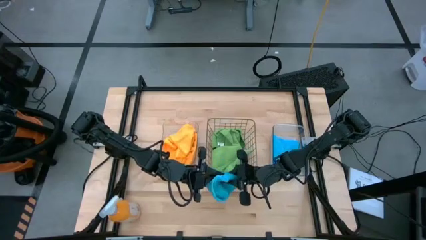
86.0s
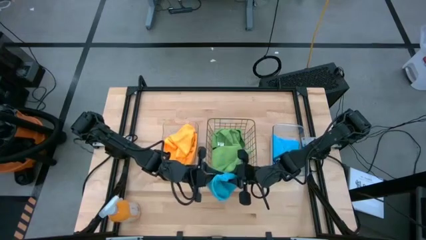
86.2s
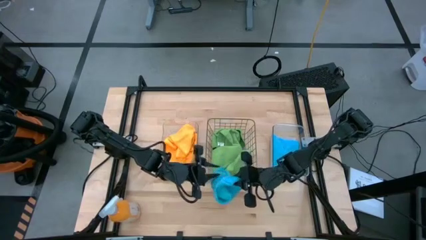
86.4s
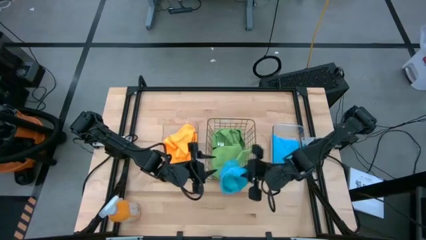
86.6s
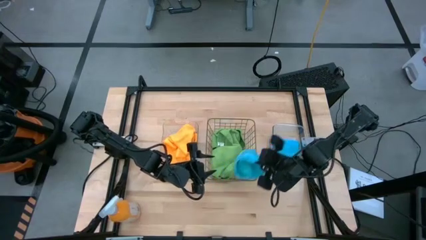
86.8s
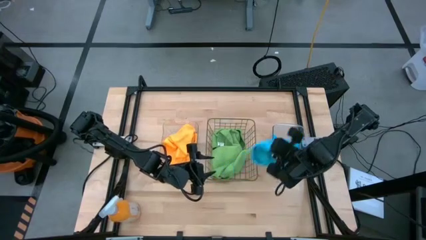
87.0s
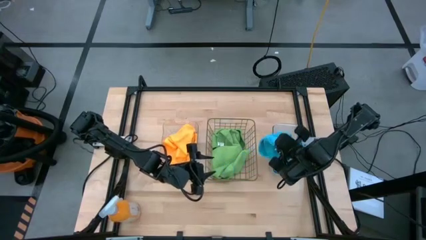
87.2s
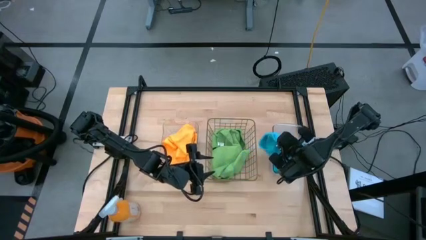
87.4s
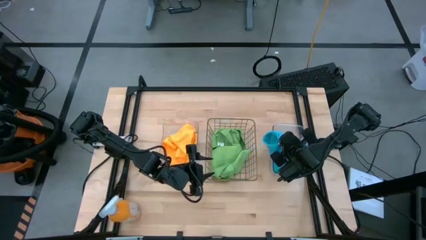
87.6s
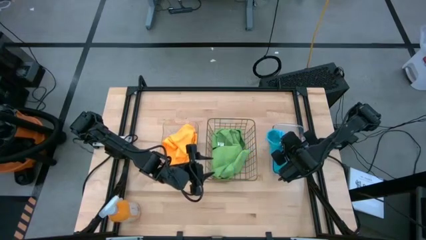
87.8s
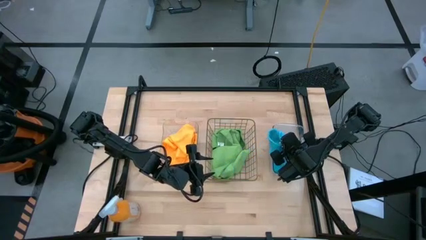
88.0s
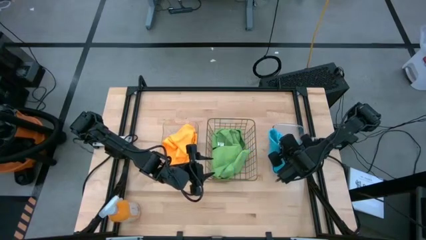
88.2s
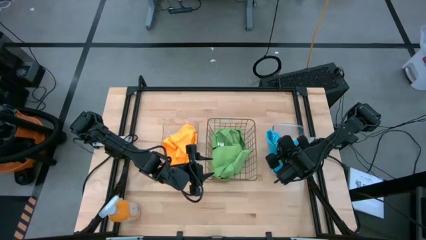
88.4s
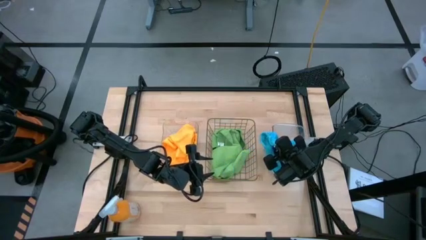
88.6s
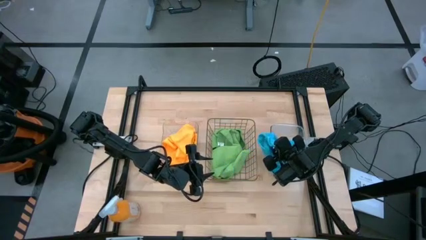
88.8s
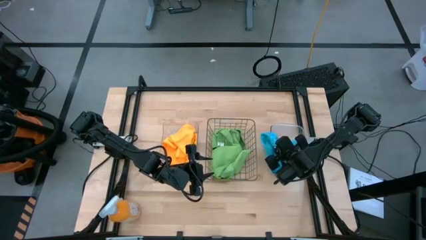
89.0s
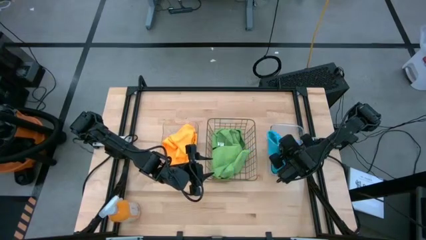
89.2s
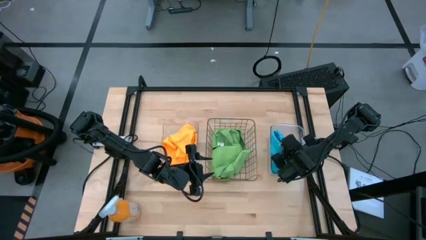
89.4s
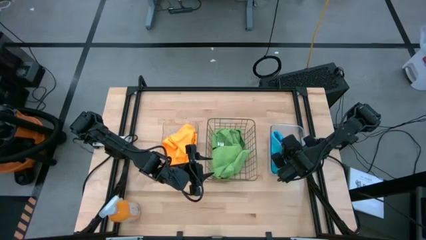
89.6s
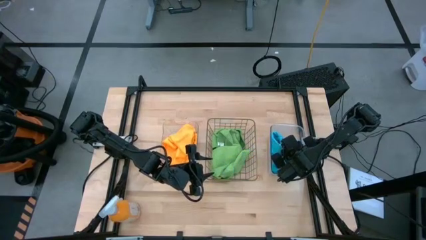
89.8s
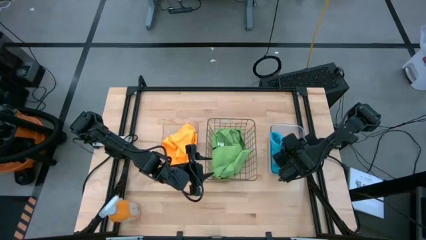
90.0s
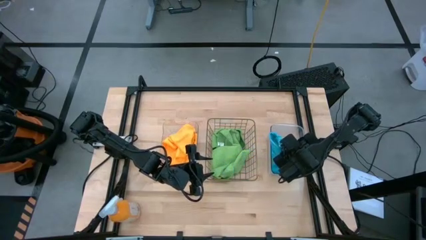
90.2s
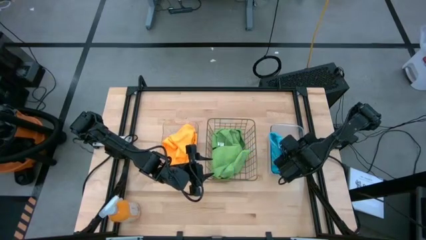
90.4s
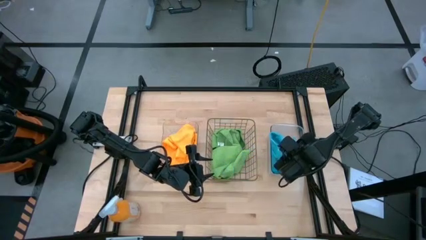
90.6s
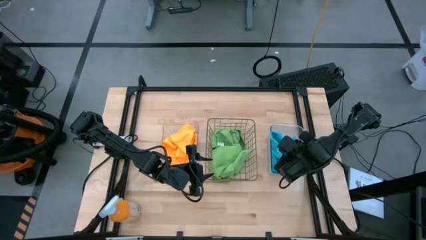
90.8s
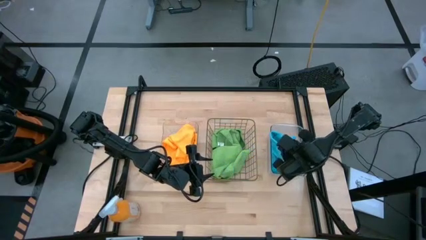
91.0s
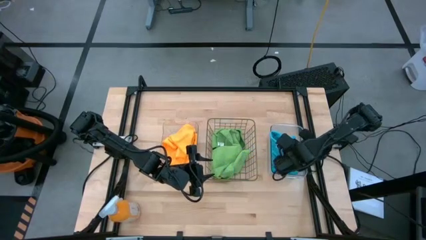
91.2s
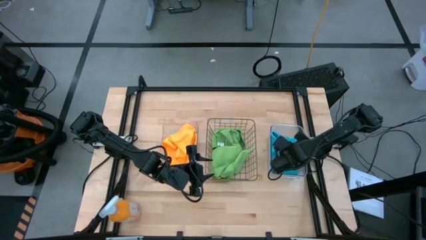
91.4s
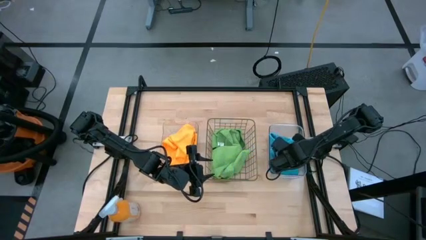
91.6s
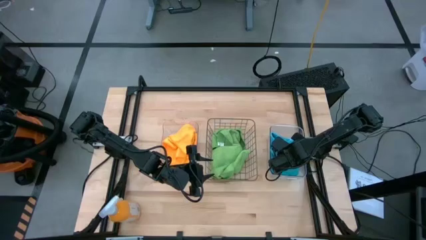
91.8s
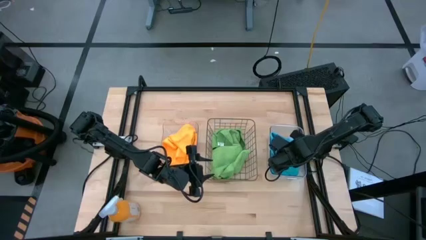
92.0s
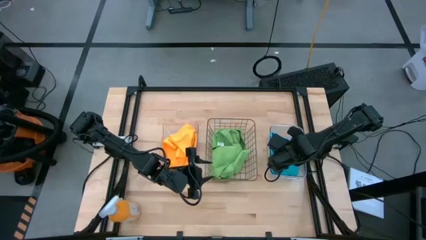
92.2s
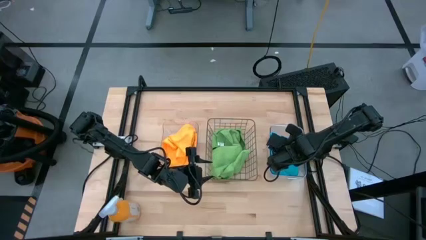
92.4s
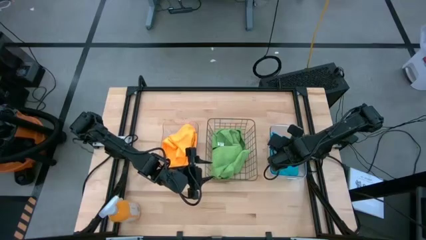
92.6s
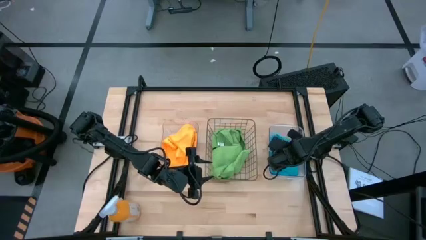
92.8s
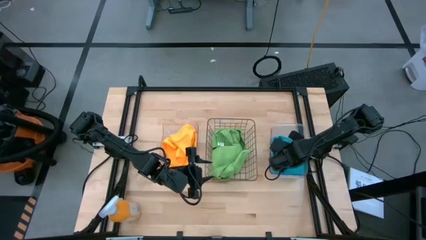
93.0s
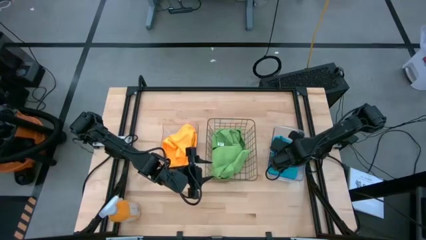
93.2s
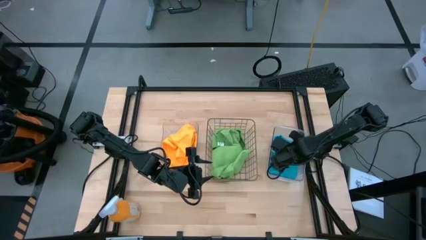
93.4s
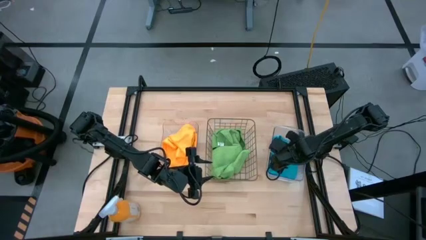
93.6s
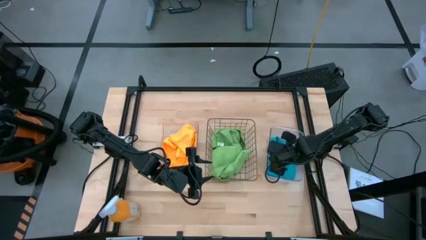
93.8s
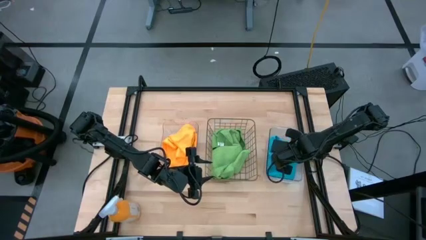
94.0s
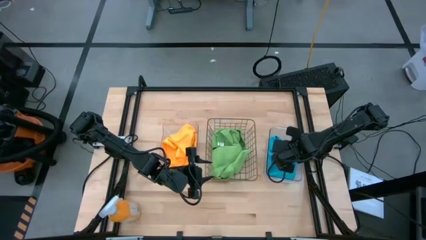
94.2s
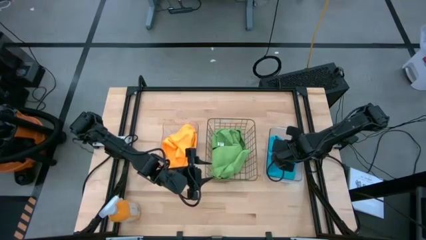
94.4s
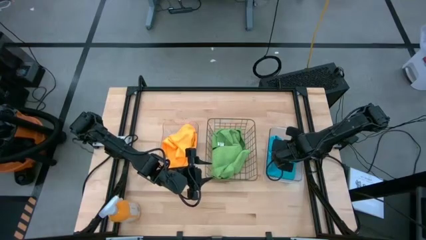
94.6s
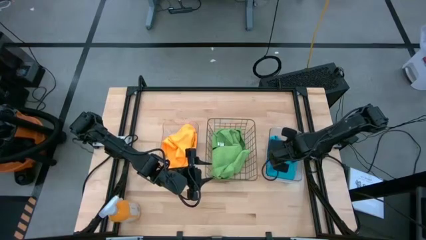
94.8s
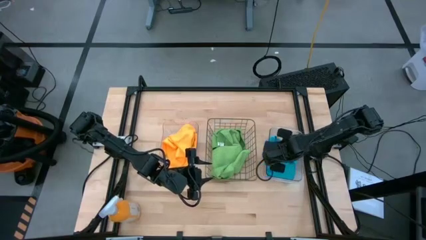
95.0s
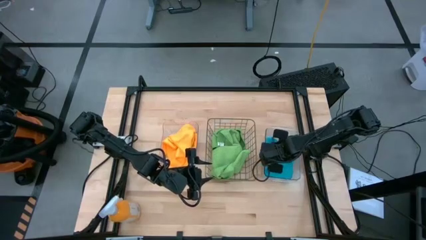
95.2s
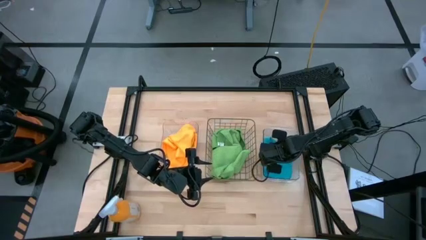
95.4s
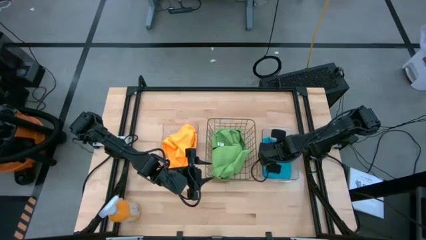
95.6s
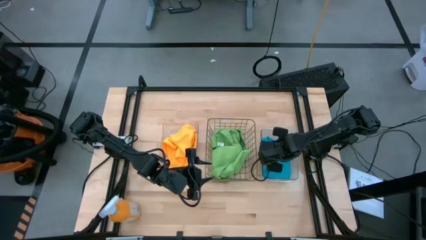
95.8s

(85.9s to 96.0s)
Task: Sort microfiber towel by color & place in baskets
Put the blue microfiber towel into the right transparent bin

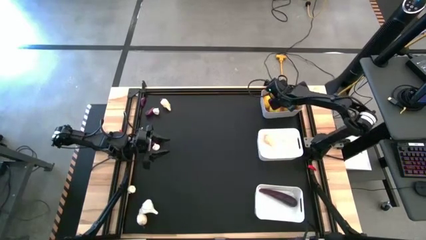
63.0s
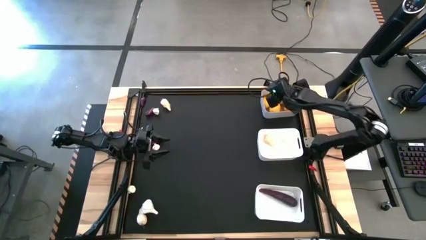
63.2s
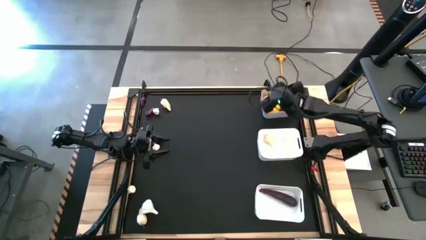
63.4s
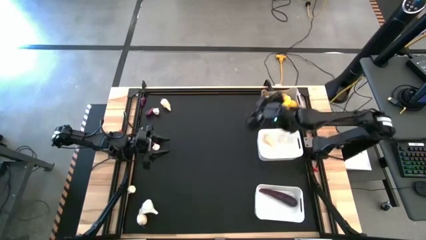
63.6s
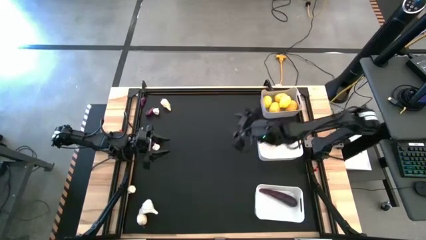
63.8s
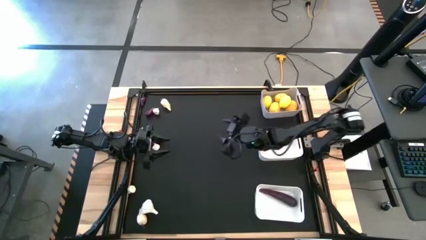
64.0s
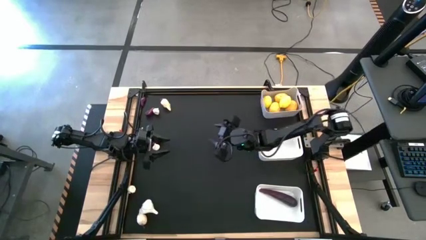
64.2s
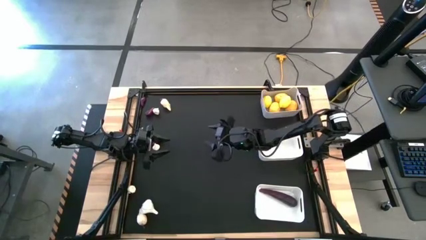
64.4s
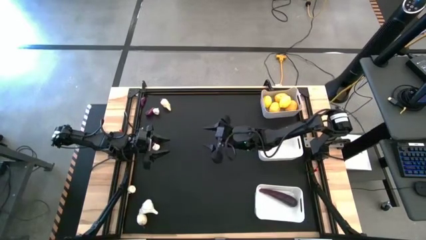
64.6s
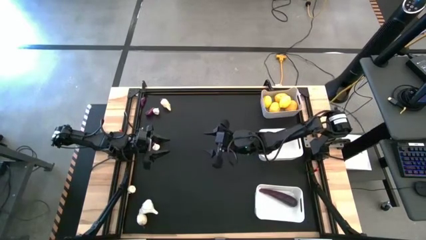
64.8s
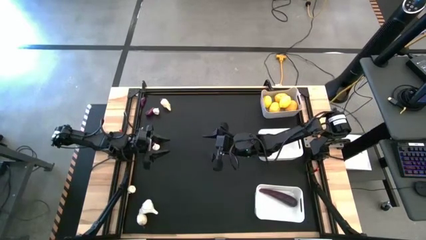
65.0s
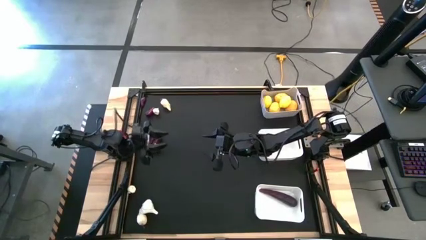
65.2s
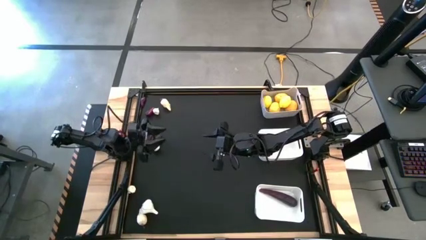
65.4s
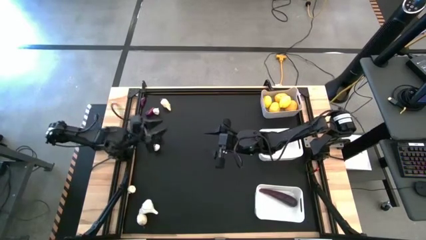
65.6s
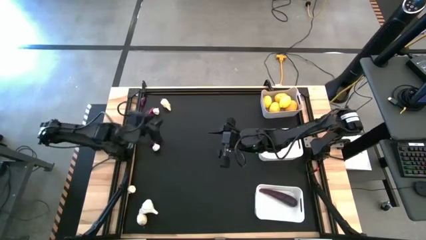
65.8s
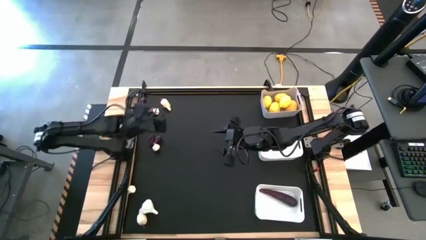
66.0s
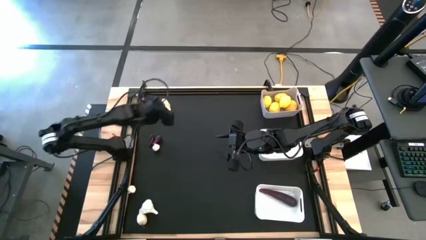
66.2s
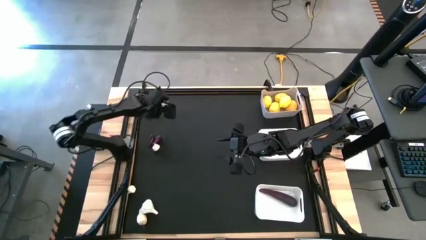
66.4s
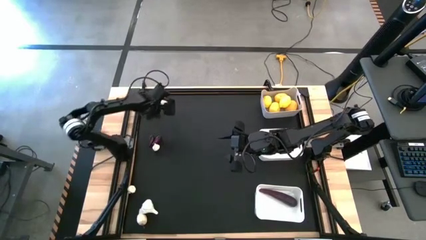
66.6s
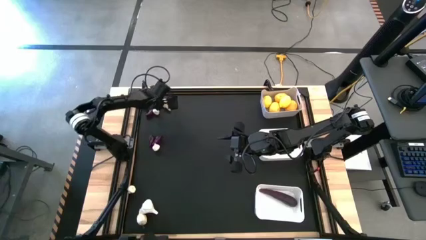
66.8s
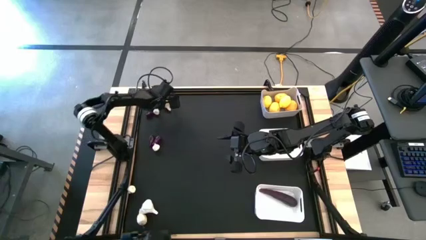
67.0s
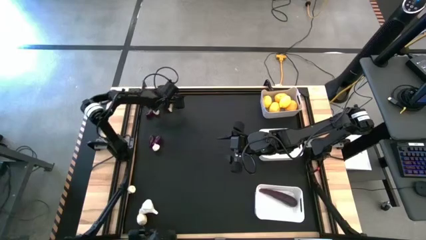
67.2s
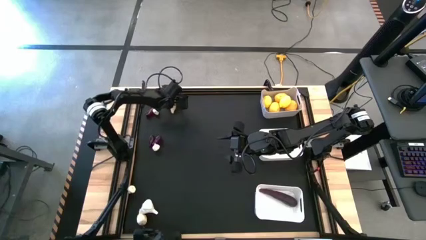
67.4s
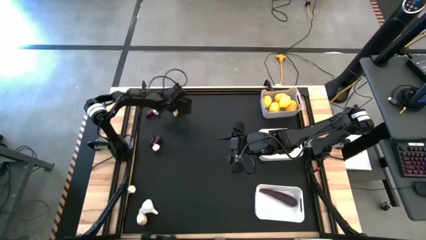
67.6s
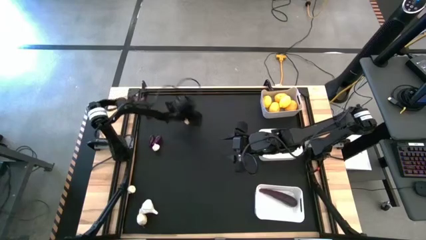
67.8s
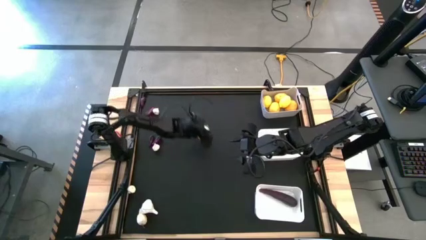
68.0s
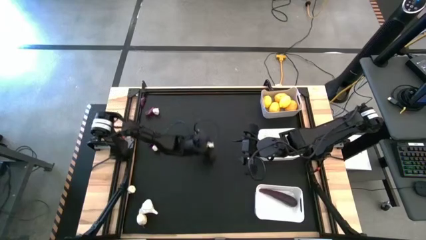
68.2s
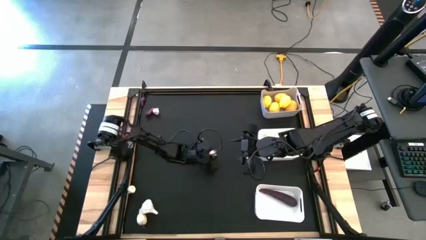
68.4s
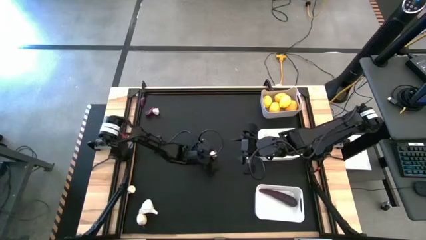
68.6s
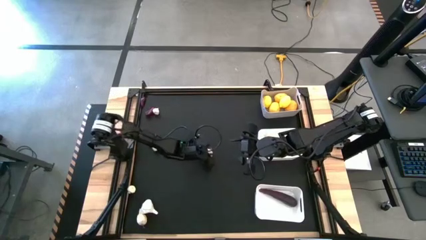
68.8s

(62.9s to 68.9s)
Task: Sort produce into baskets
Move the garlic to the center of the table

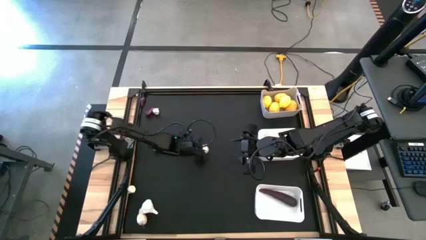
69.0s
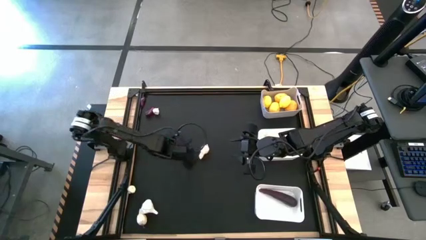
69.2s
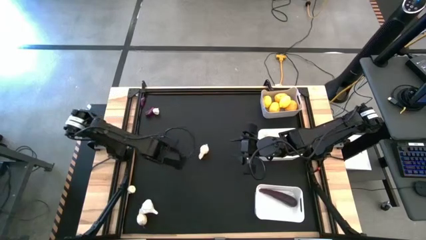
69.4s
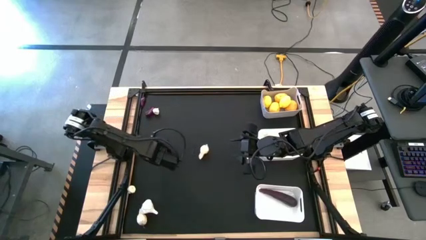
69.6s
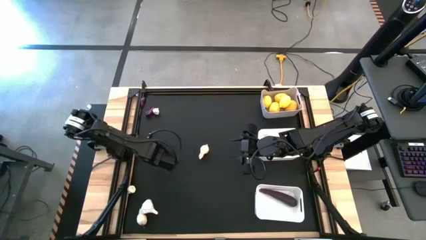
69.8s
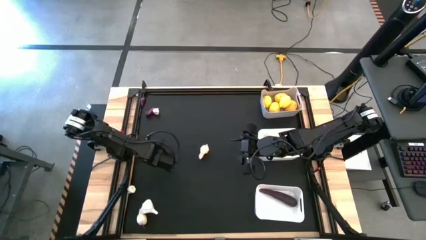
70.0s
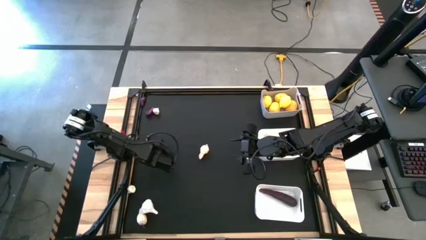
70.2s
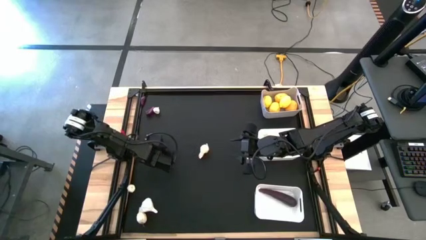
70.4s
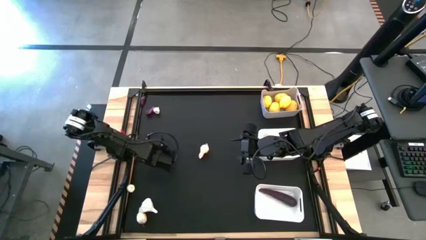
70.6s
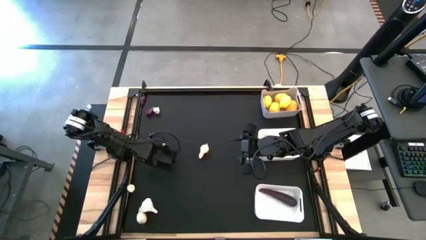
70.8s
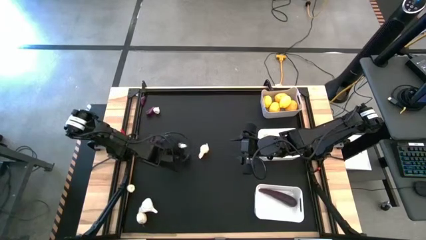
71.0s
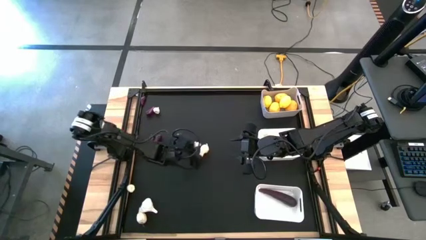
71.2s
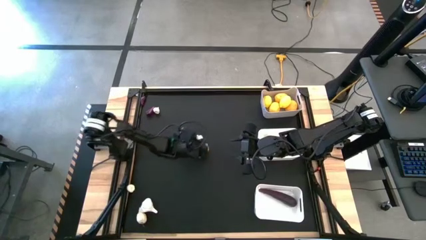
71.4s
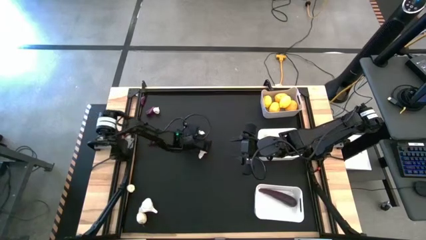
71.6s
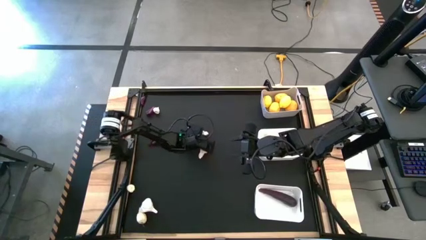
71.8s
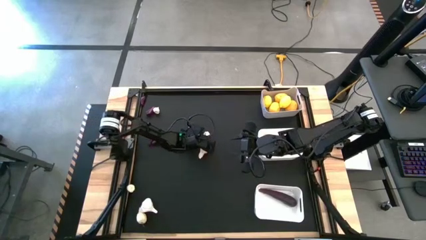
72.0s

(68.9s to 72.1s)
Move the garlic to the center of the table
